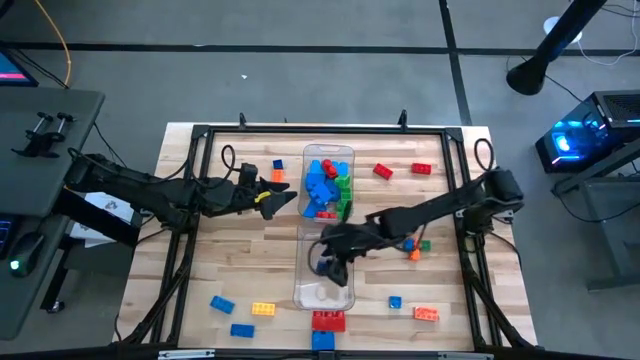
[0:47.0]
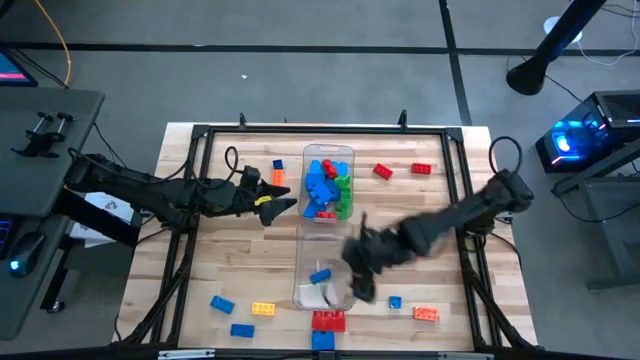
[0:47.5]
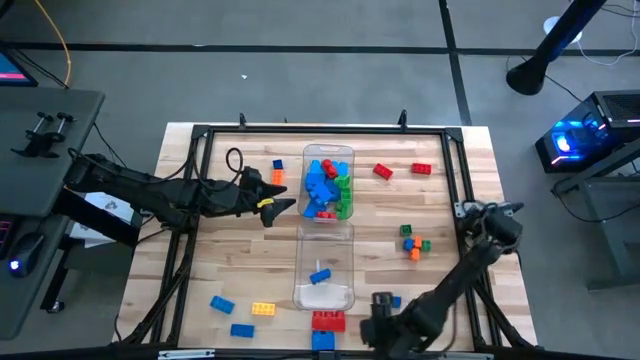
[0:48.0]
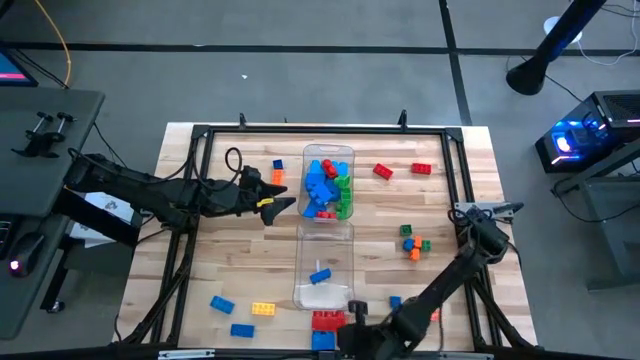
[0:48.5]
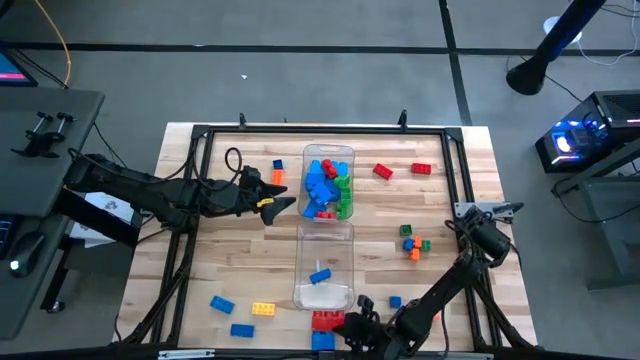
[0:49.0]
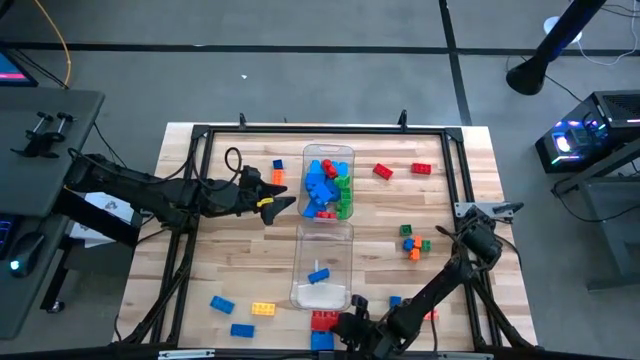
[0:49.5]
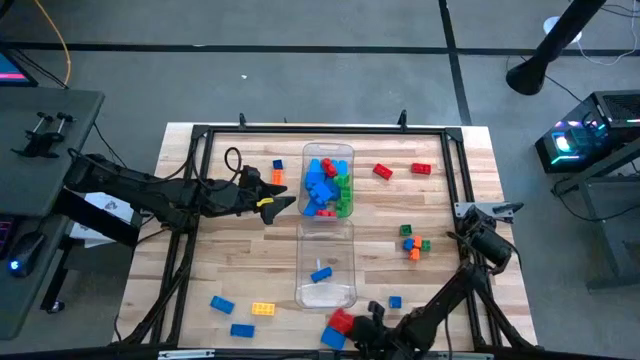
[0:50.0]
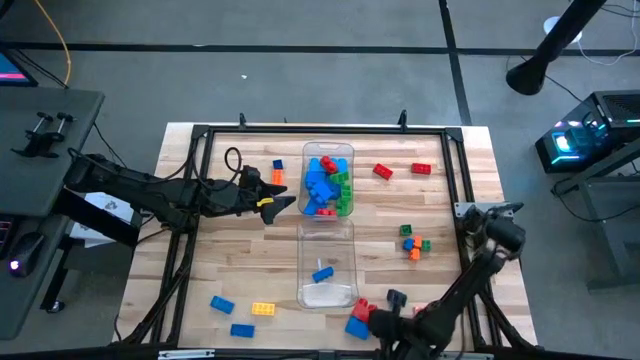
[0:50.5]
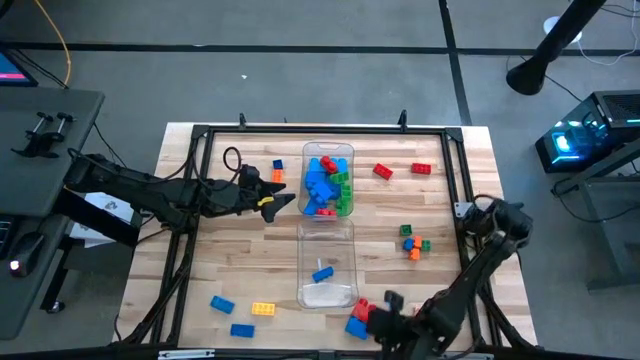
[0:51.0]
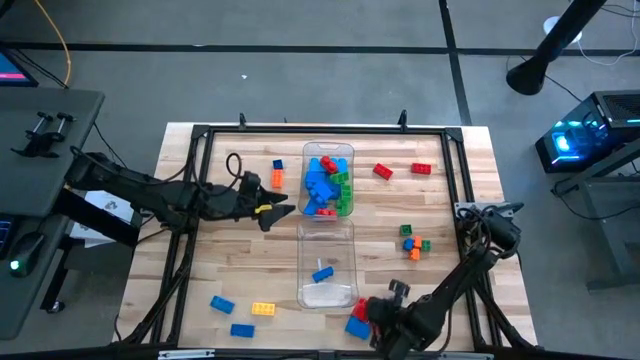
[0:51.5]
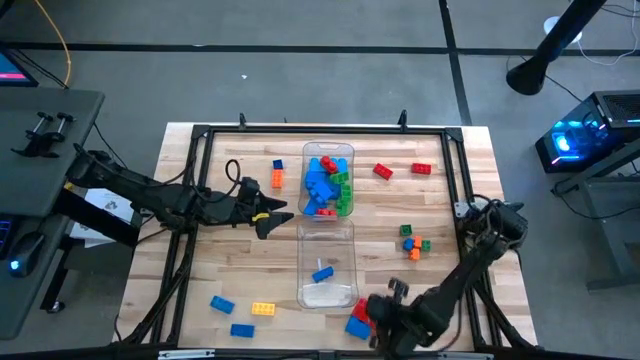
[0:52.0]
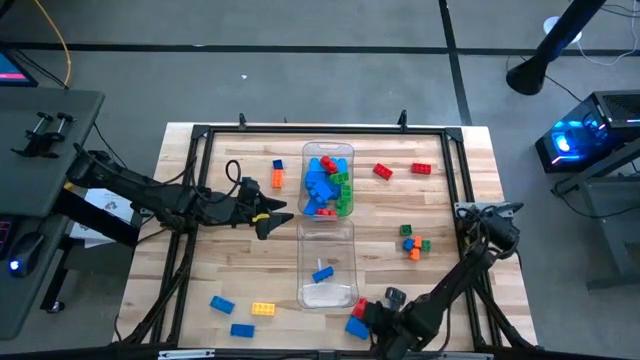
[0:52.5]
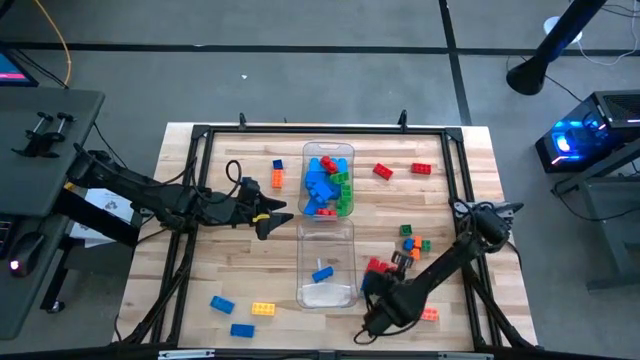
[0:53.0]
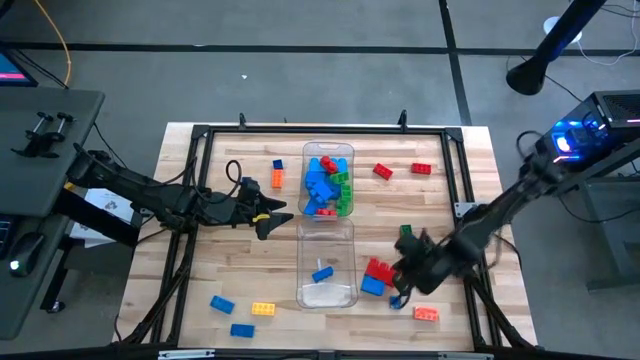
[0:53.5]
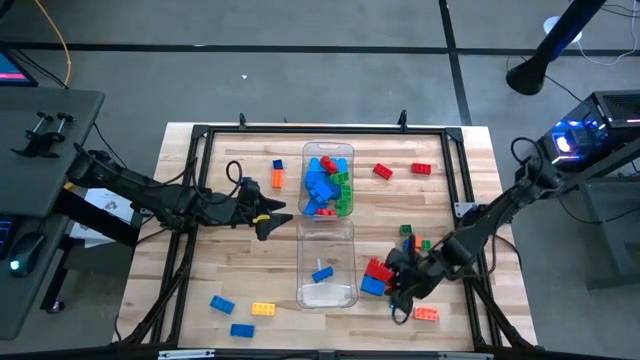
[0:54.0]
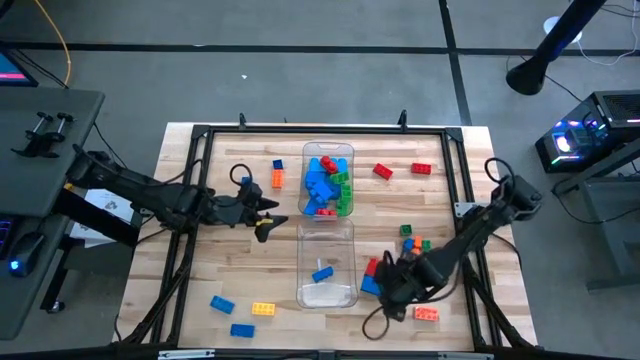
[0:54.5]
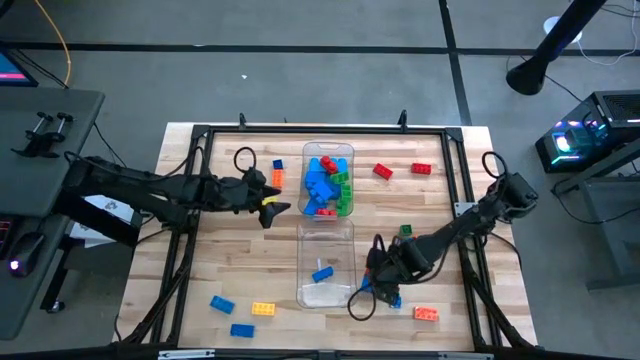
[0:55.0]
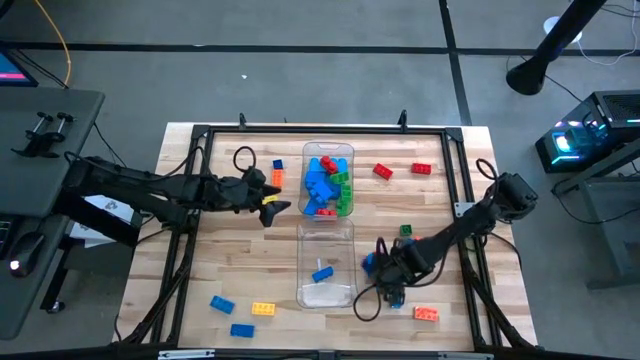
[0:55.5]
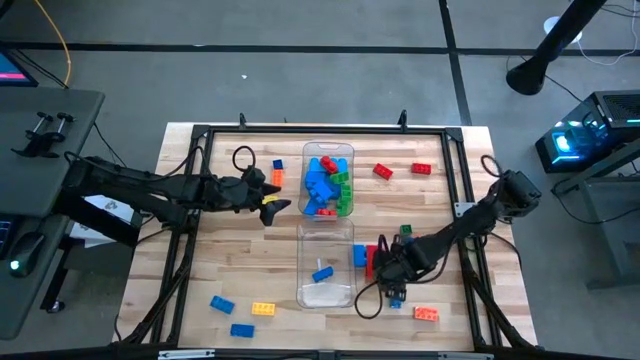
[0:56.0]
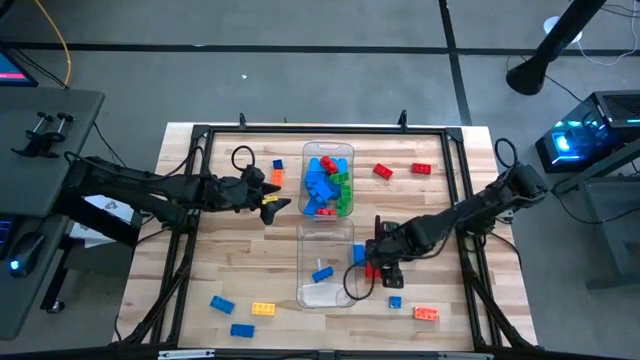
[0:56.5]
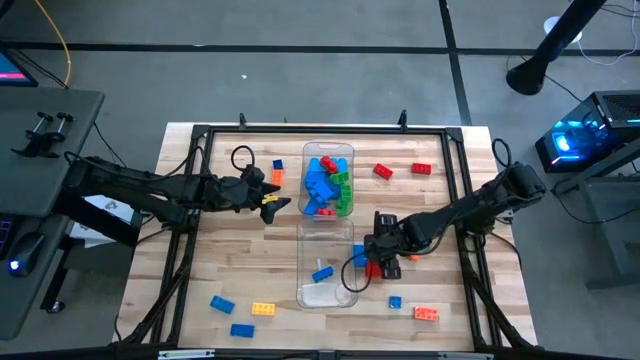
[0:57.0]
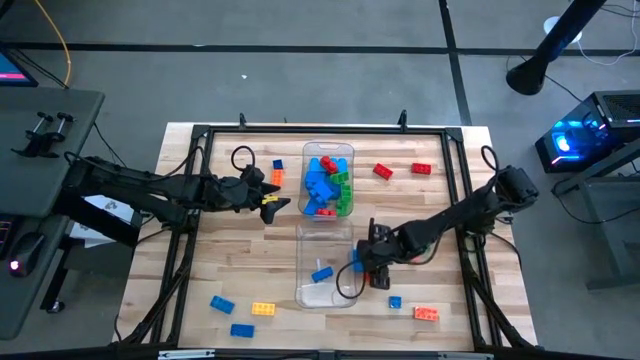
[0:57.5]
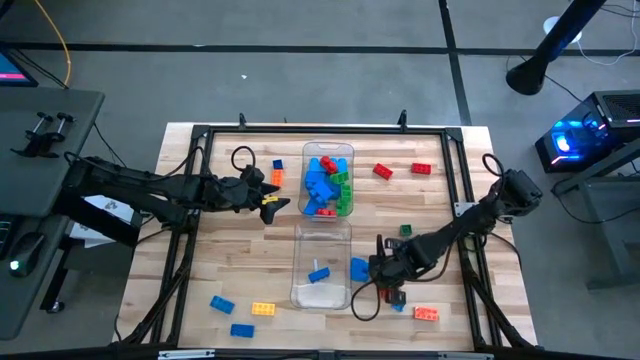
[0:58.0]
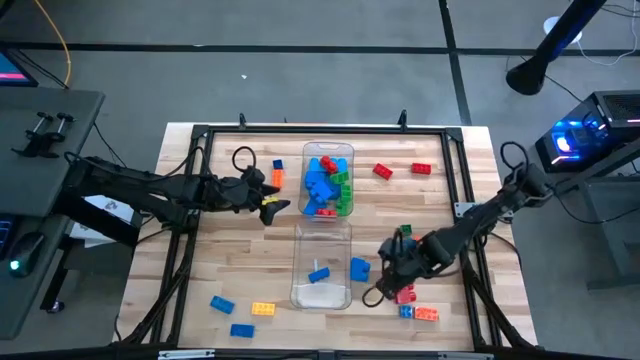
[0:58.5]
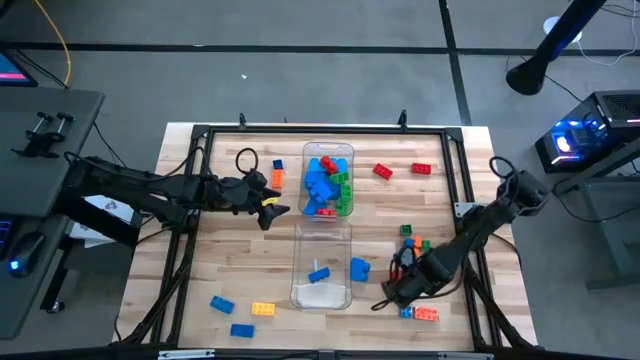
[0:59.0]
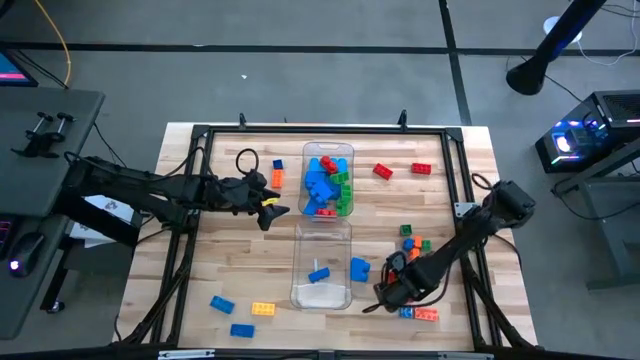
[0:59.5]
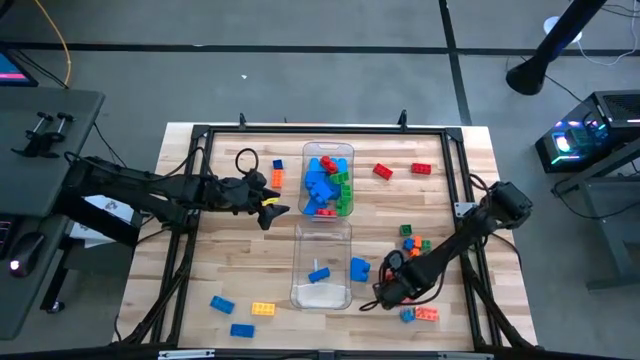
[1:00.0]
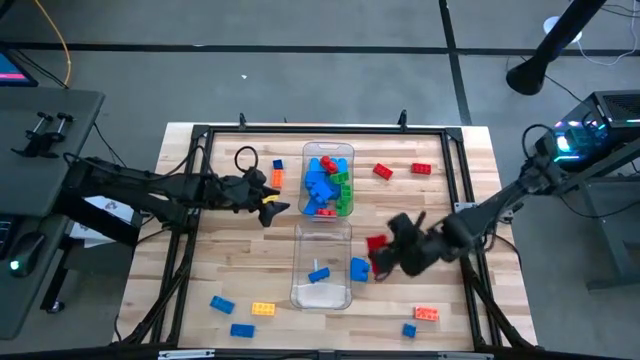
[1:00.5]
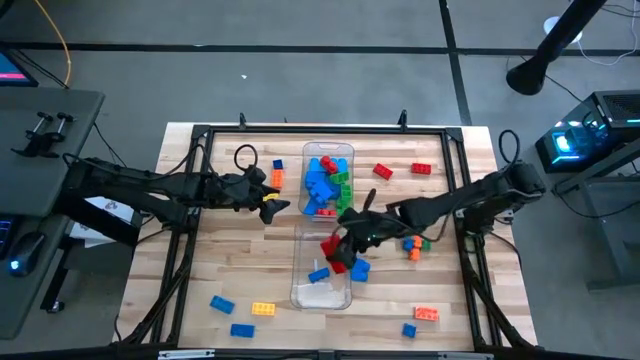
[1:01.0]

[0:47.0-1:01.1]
Task: Sort blocks by size
Put the large red game piece in the top transparent bin

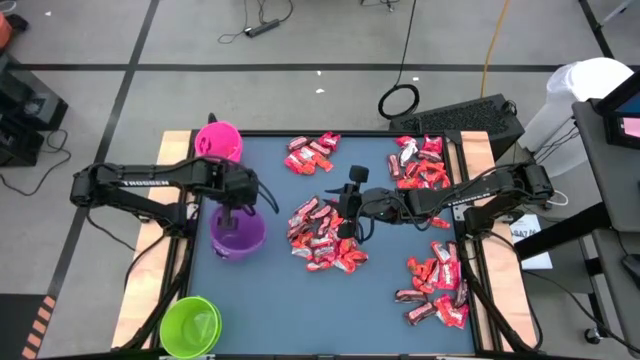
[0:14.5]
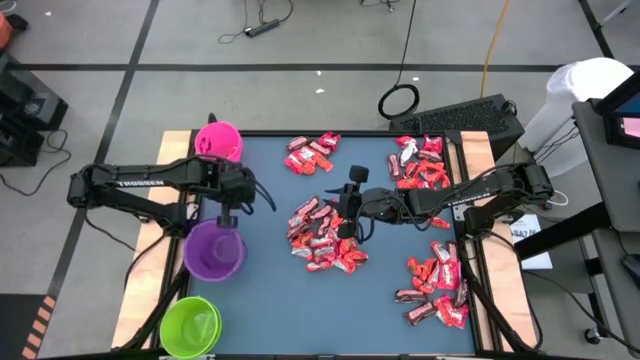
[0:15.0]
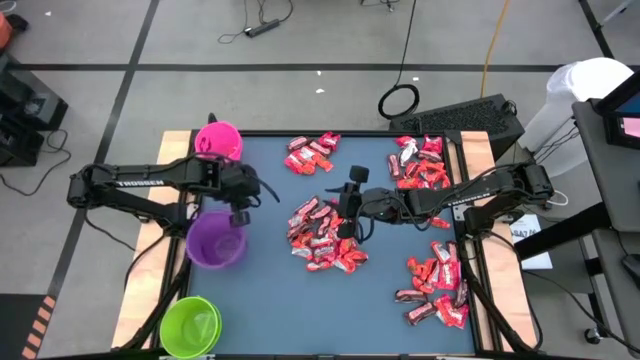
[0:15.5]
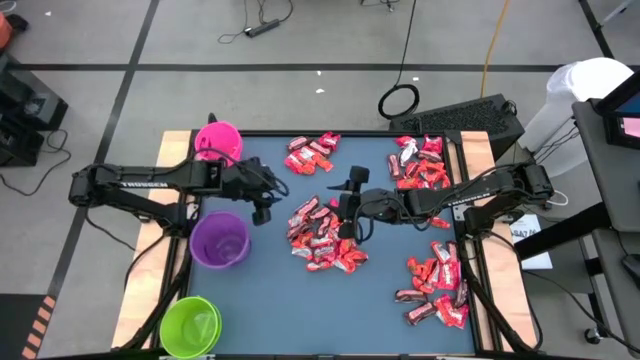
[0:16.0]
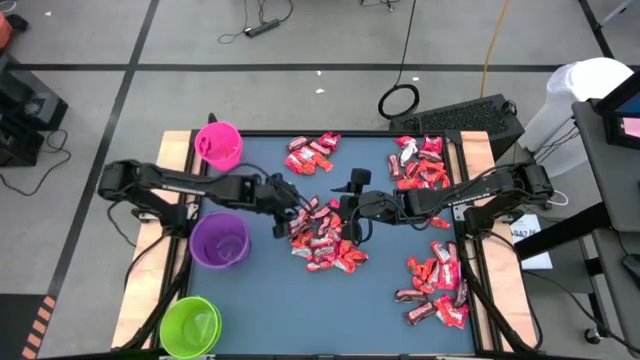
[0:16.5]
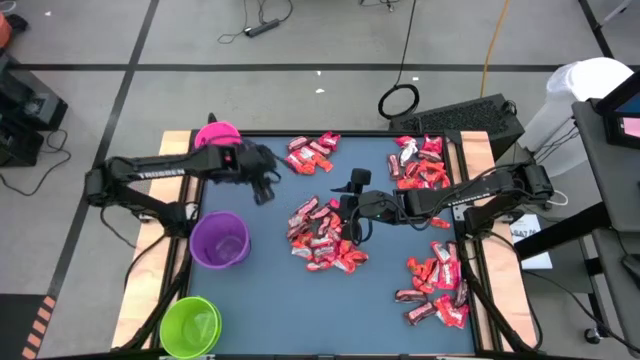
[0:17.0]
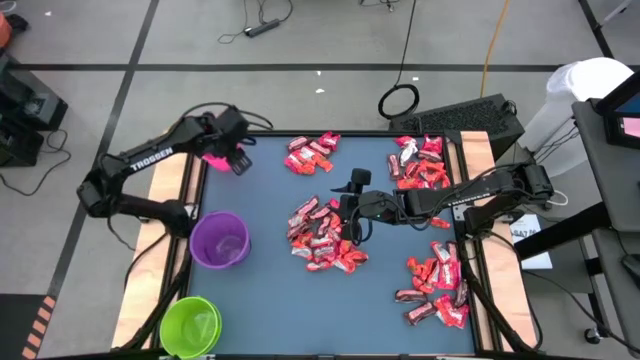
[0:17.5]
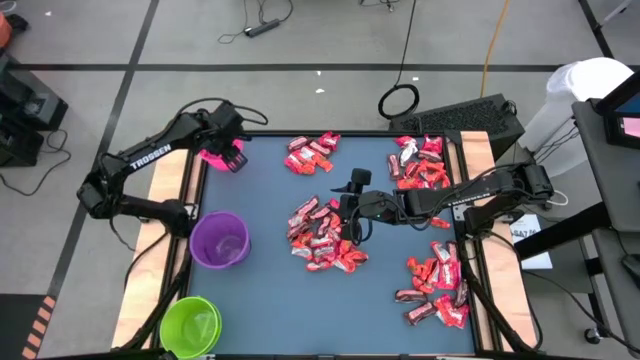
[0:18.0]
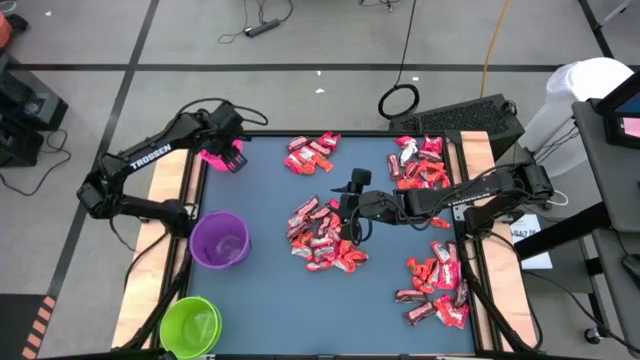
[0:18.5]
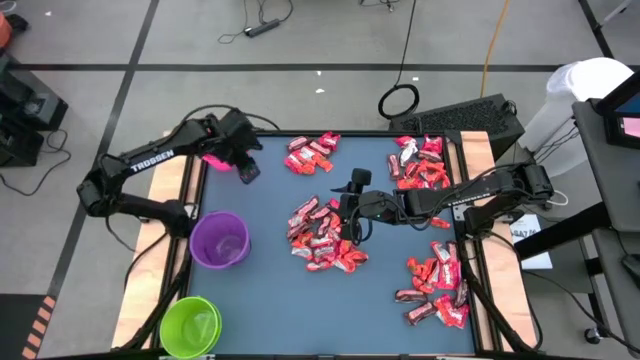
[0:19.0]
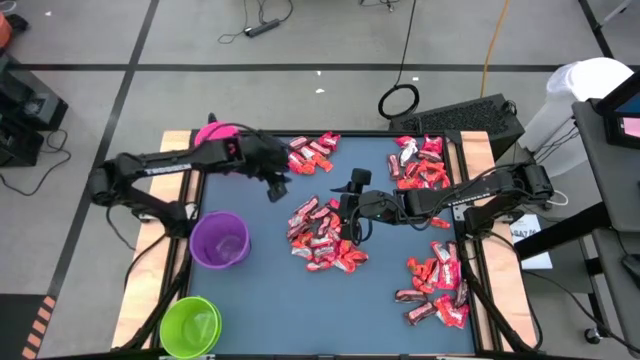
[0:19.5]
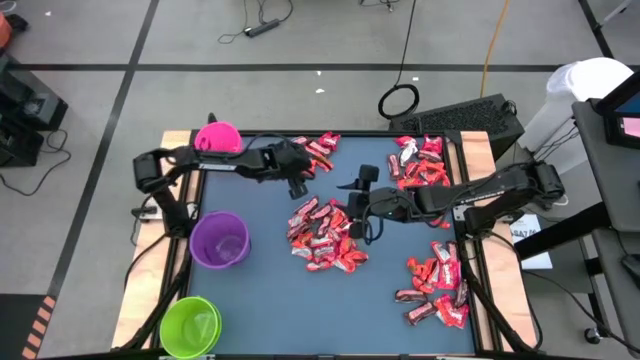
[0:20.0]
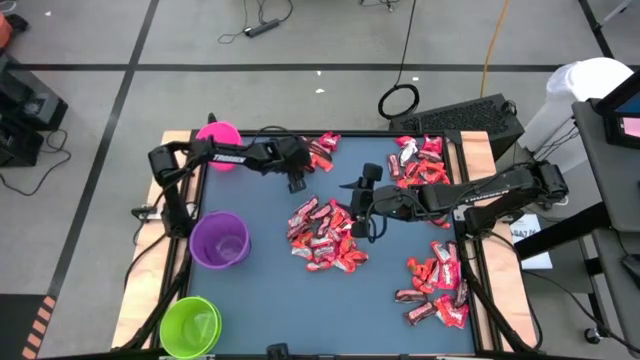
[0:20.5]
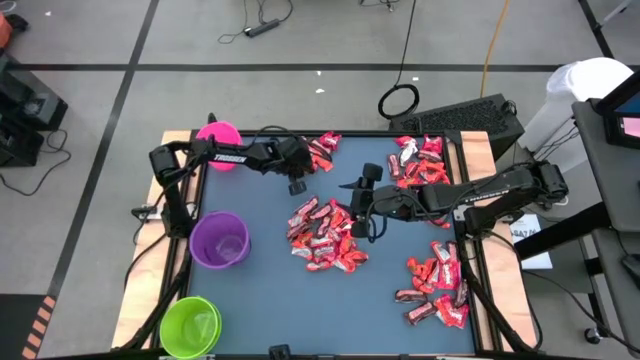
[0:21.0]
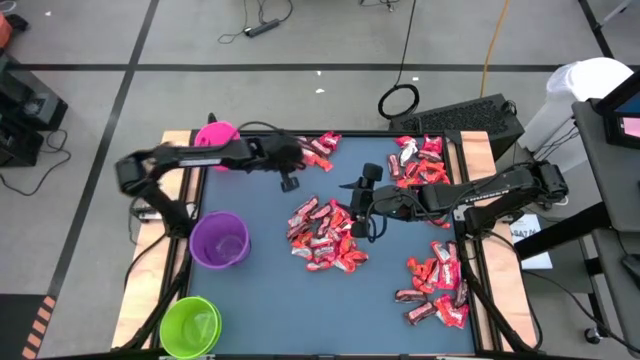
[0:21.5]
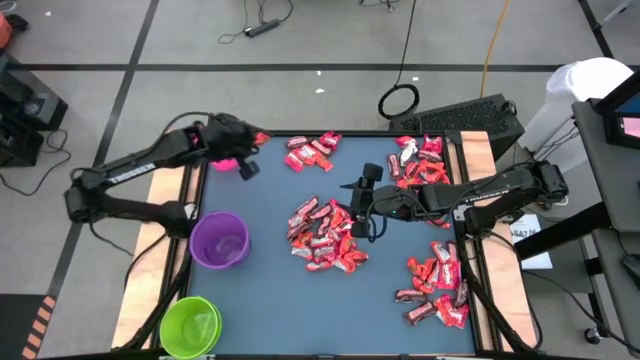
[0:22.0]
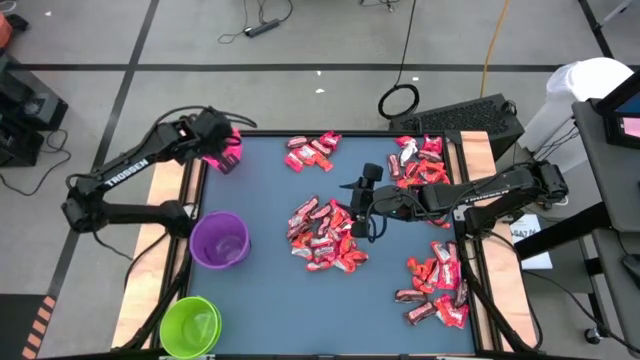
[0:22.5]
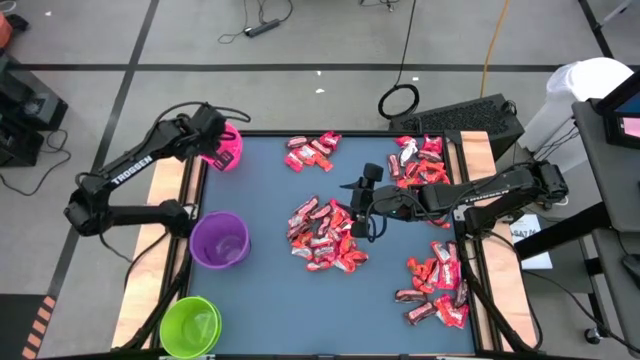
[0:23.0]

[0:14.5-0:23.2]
Task: Organize candy in baskets
Put the orange chocolate into the pink bucket
